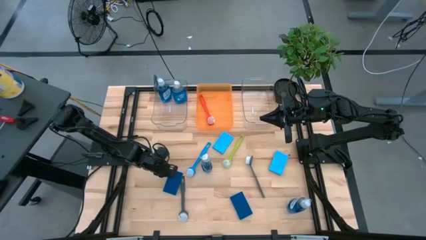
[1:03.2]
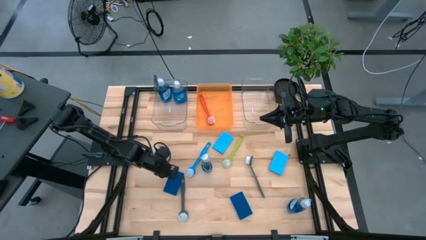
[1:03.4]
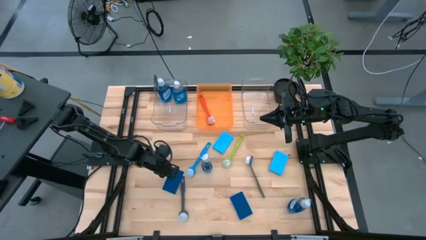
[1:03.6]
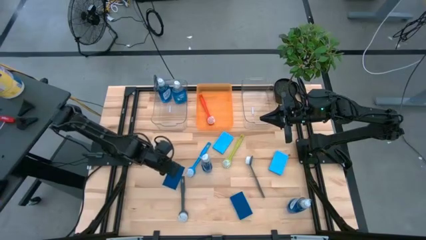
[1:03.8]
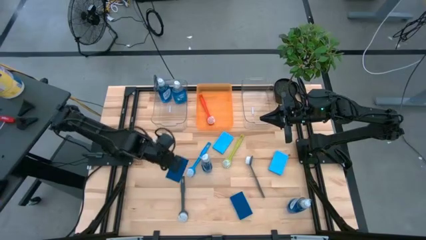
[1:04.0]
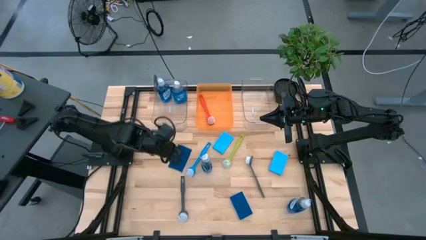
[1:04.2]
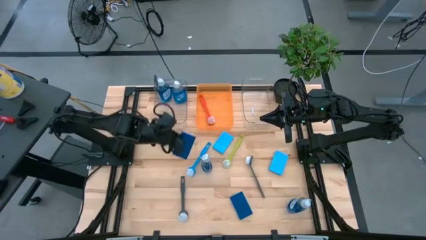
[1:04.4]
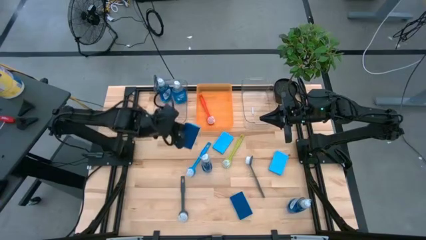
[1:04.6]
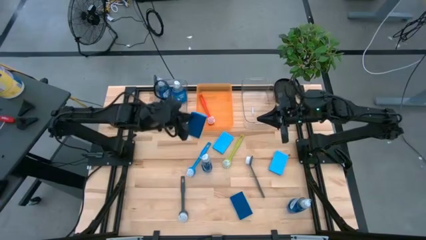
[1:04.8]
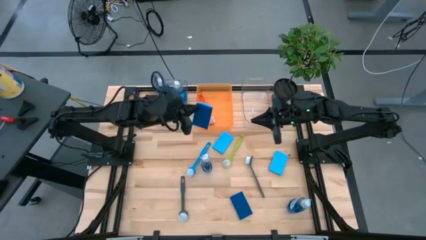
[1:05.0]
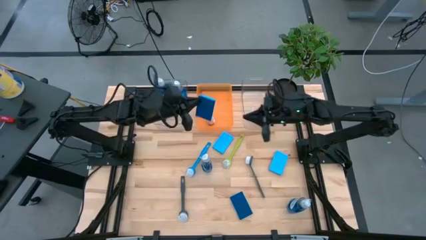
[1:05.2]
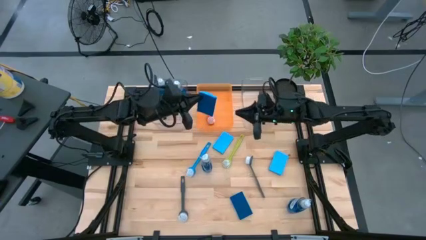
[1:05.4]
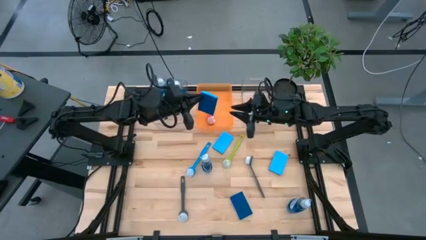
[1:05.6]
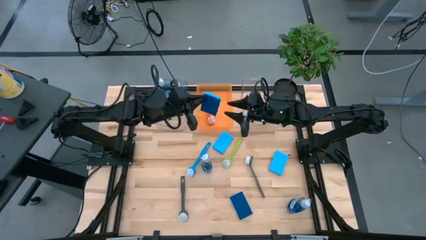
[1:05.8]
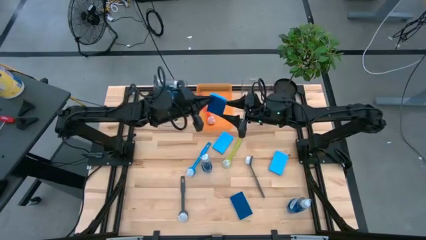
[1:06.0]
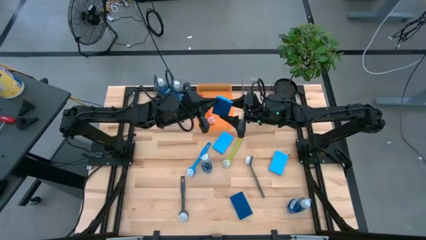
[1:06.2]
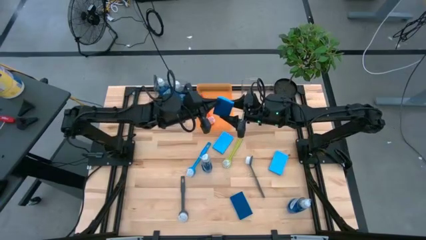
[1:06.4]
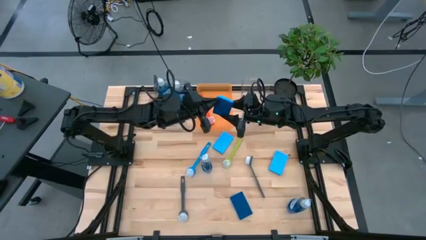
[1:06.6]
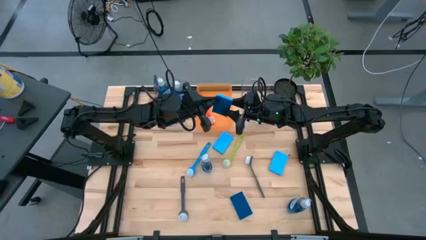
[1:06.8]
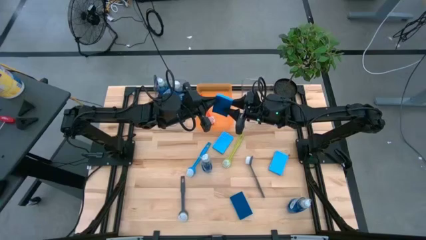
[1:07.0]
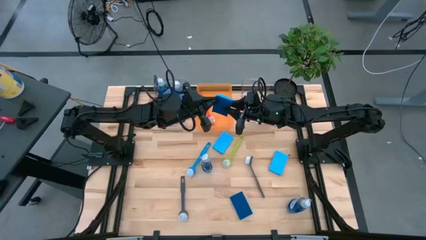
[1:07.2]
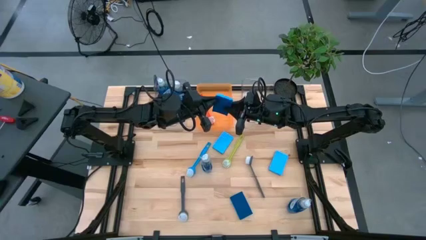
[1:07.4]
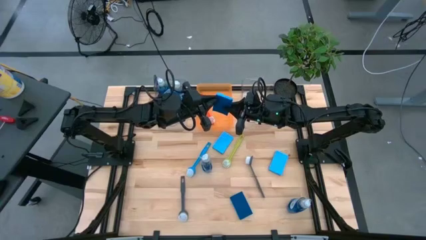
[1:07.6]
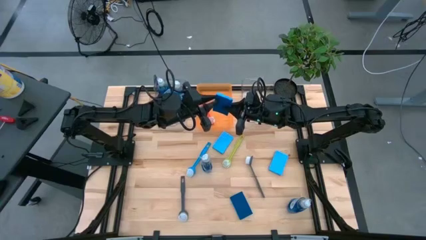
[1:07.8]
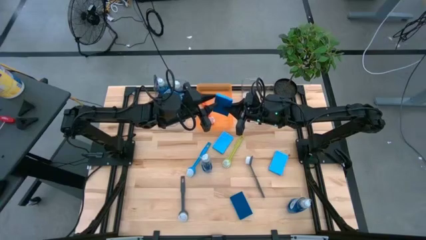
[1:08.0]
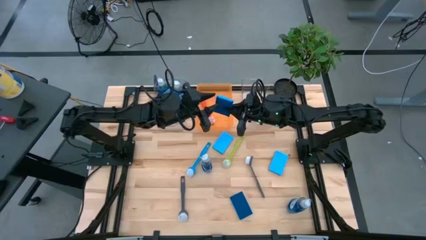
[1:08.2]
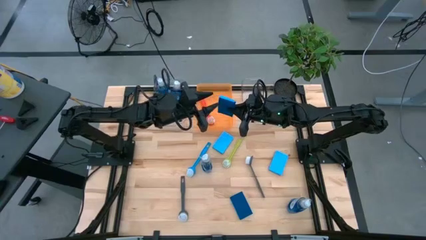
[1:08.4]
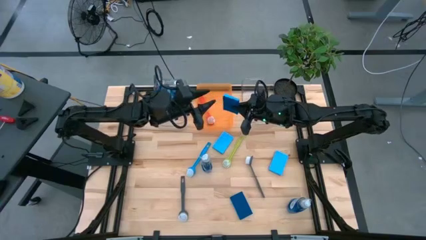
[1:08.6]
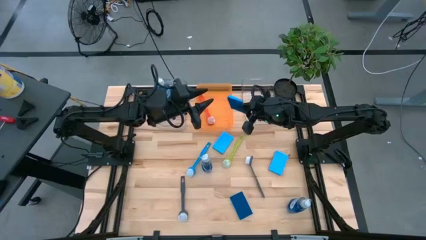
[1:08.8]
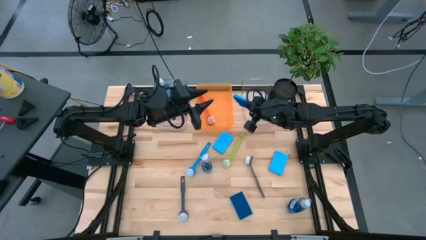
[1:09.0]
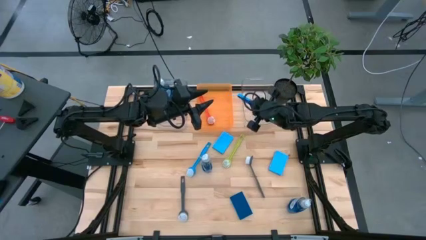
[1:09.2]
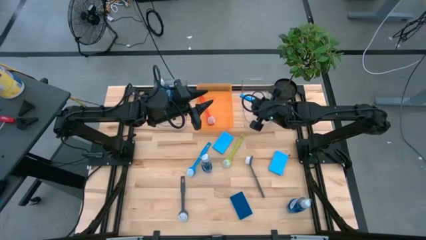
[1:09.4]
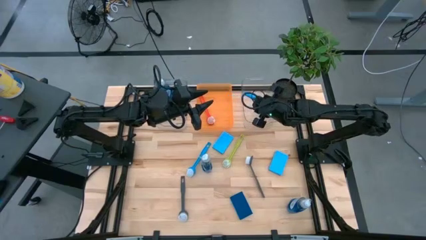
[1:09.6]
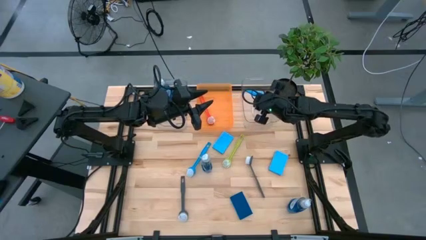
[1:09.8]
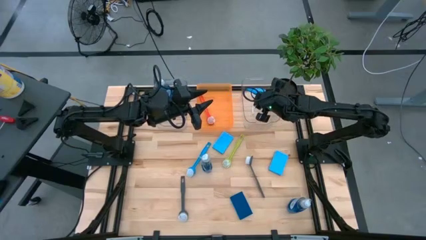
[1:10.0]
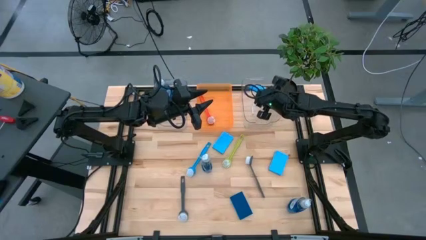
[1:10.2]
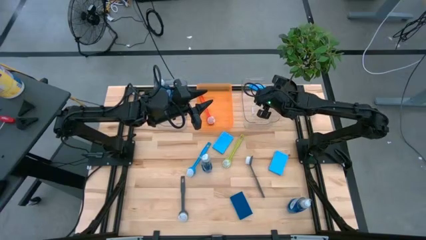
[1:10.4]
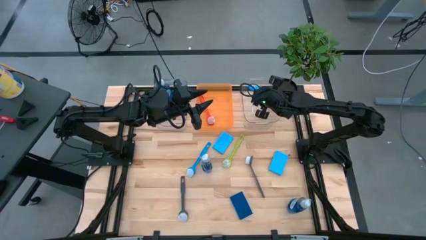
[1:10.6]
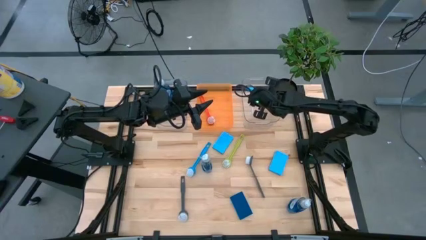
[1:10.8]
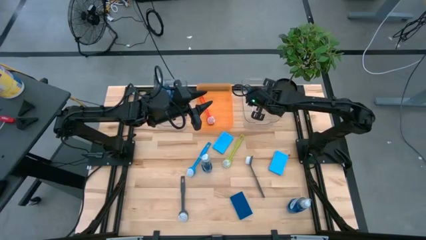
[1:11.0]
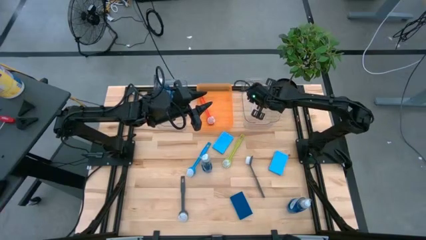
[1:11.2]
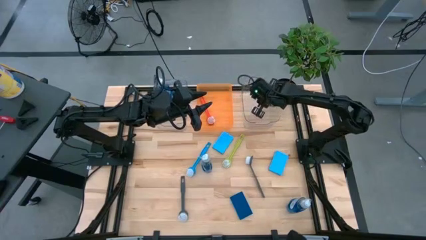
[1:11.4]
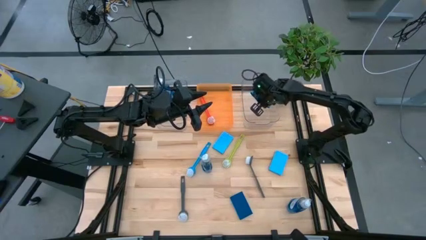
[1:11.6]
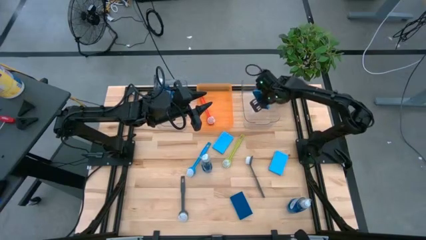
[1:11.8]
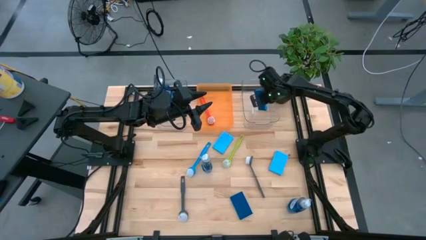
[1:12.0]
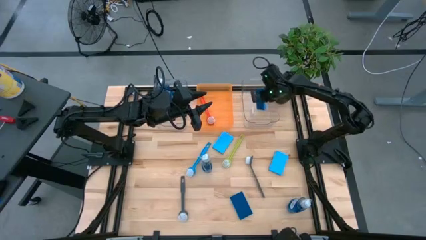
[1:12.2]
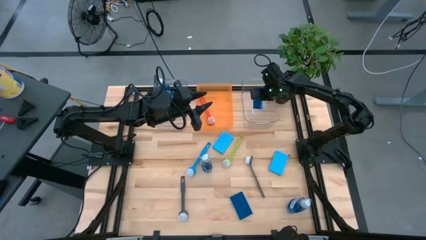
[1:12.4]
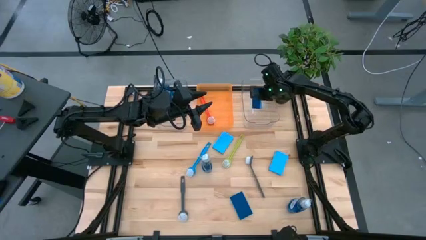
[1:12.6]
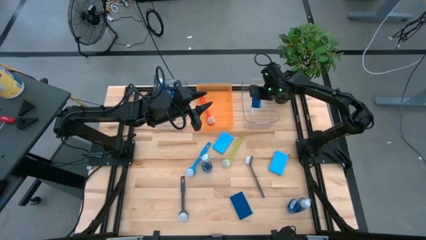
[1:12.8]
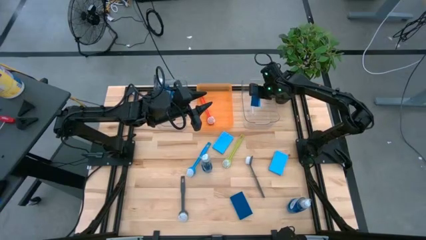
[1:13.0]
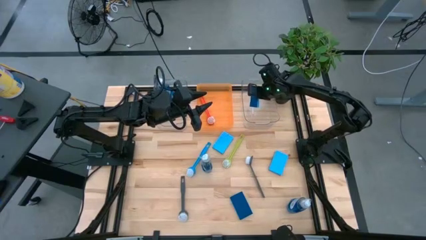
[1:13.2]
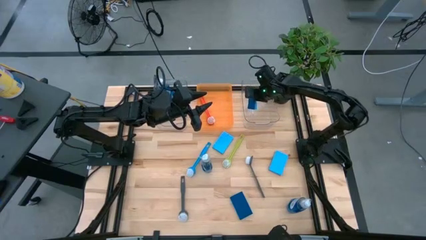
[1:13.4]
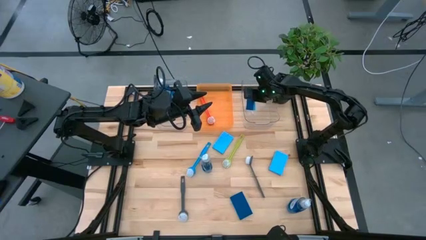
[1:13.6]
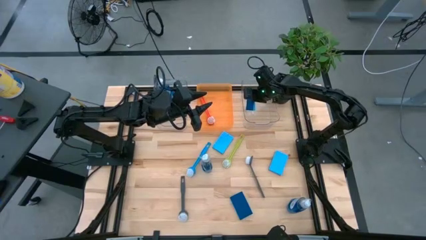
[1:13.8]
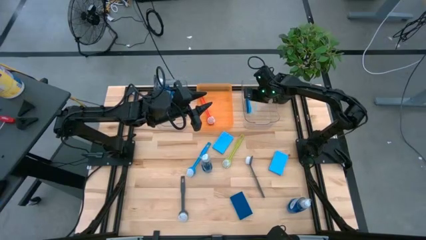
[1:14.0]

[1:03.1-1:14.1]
Task: Pick & Place Kitchen Sink Supplies
Put the blue sponge into the right transparent bin
